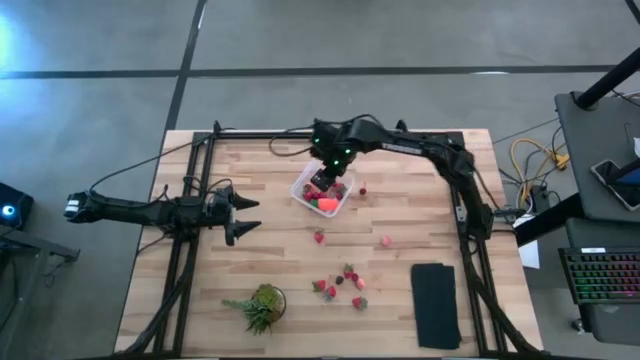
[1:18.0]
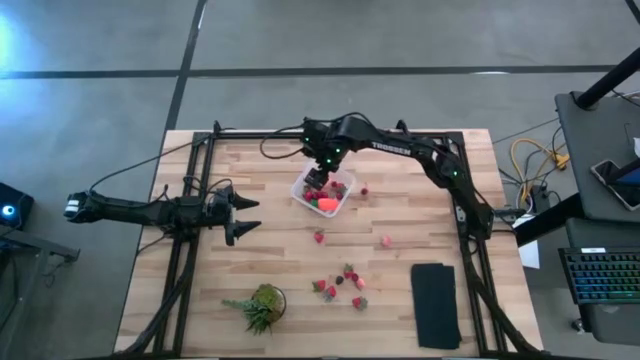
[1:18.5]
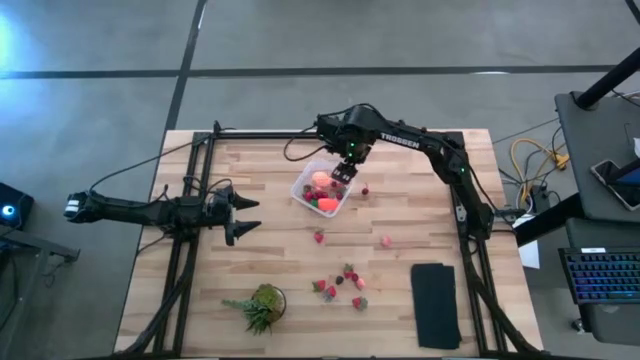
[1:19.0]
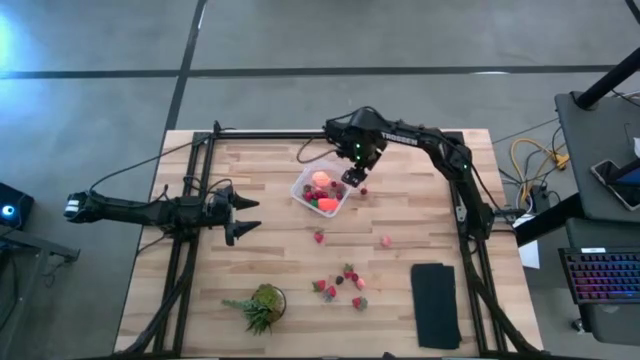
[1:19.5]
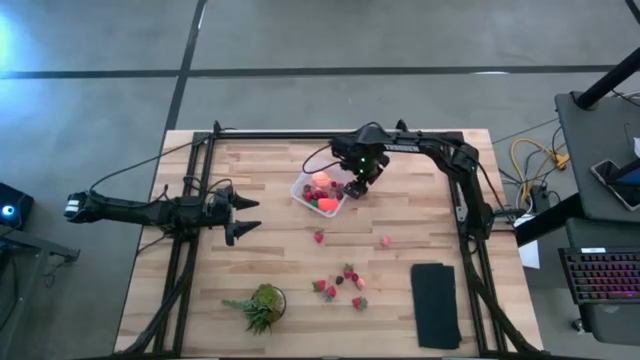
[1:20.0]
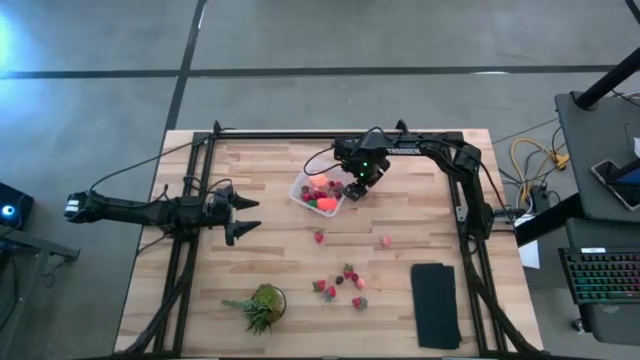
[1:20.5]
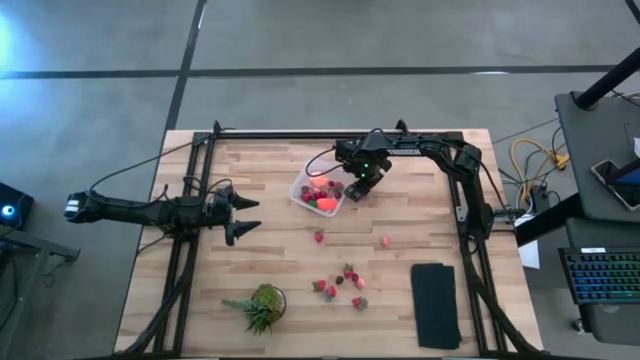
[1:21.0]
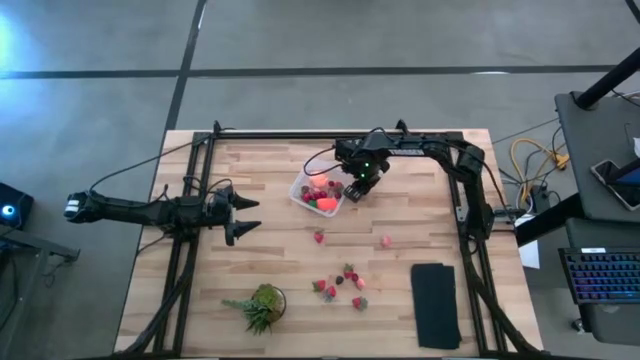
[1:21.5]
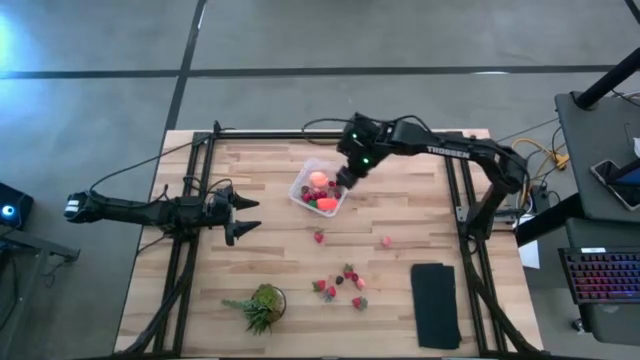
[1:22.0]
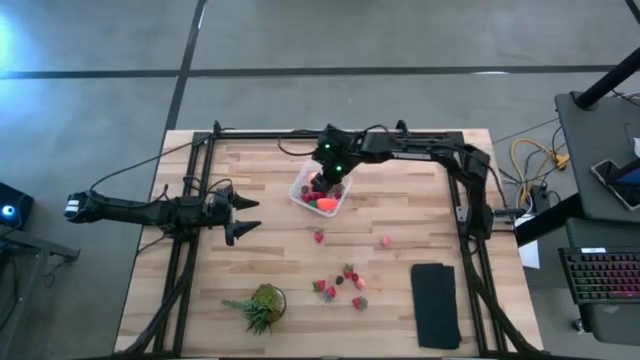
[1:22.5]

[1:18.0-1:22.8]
Task: Pick and placing Produce into tupperware
Put the red cherry into the transparent bin

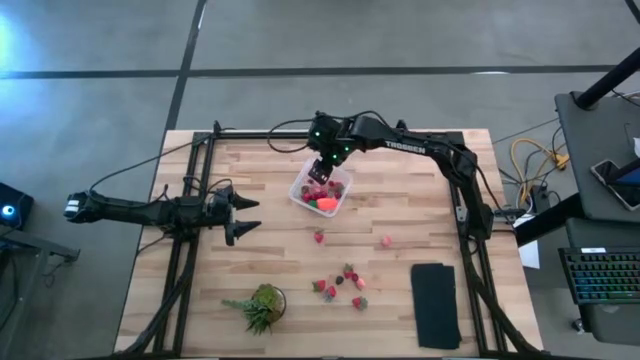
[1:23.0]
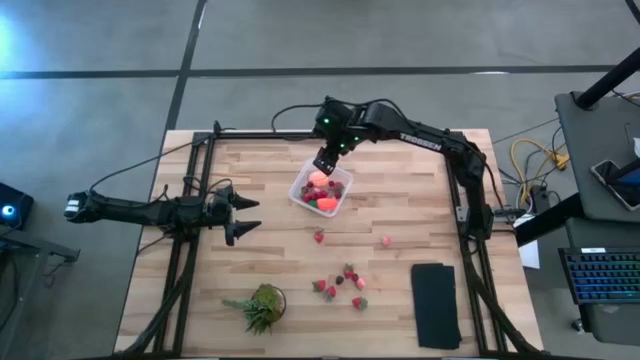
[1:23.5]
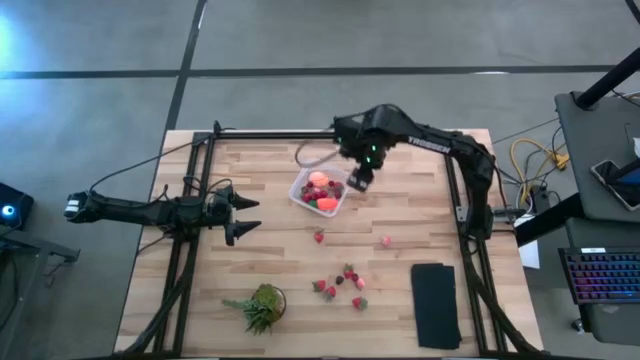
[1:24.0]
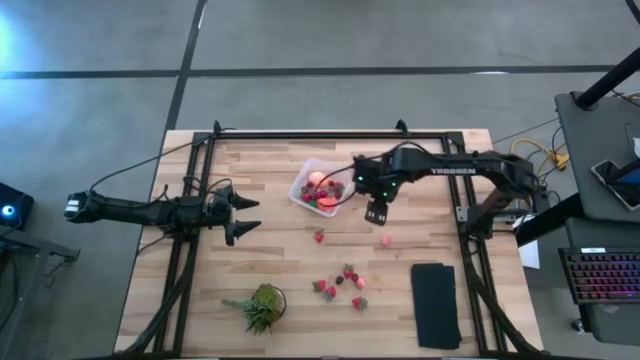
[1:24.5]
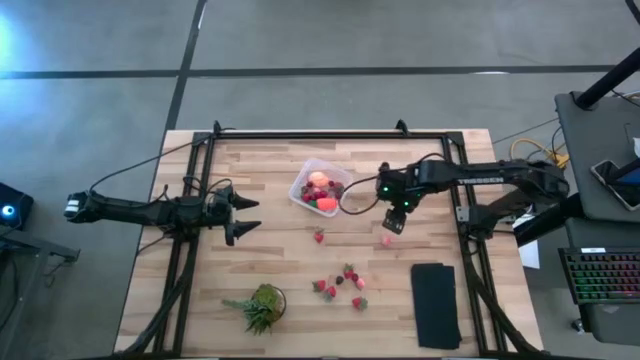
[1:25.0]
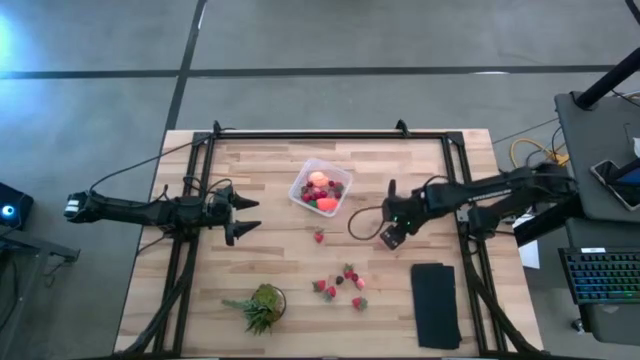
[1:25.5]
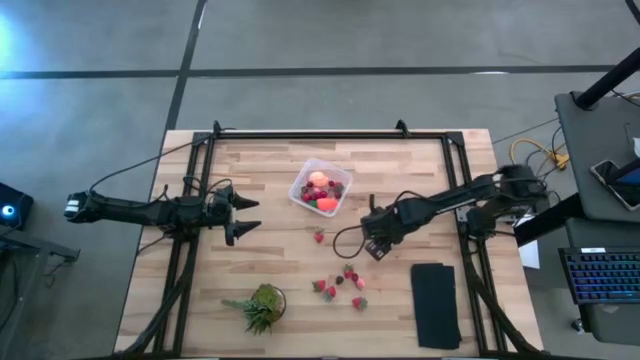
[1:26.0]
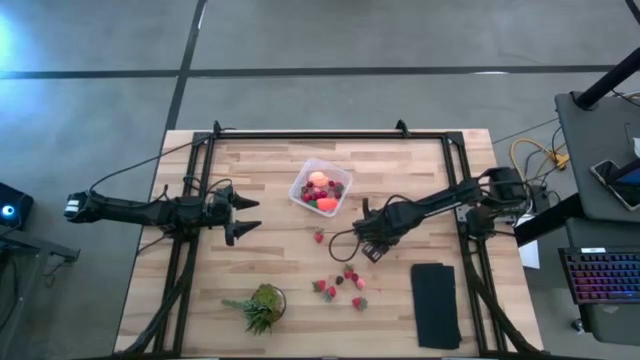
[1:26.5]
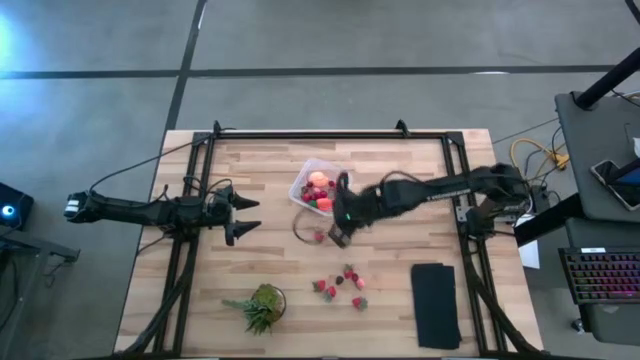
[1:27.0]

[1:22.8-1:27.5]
Put the pink peach into the transparent bin

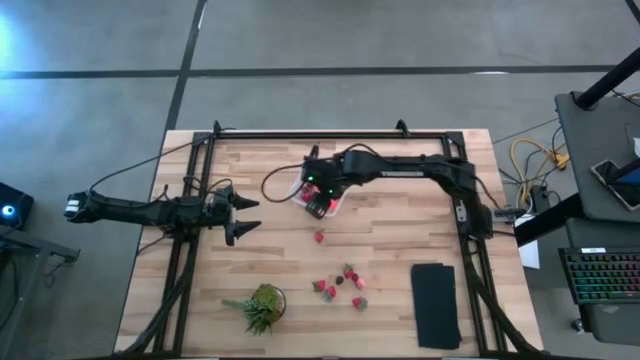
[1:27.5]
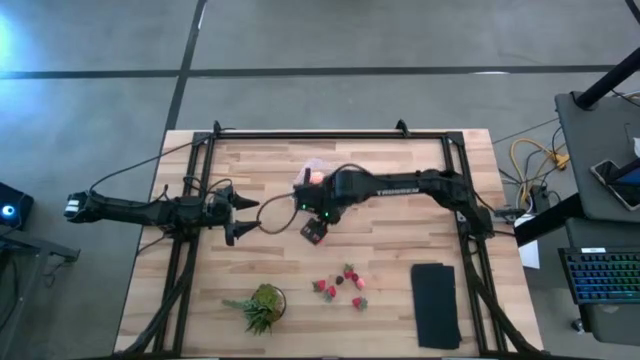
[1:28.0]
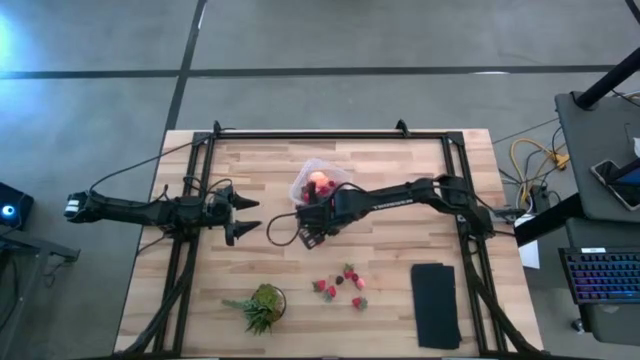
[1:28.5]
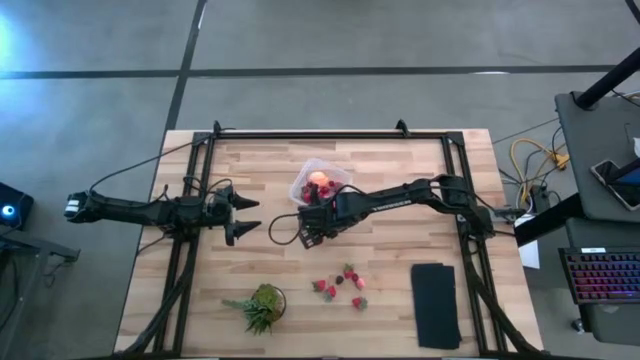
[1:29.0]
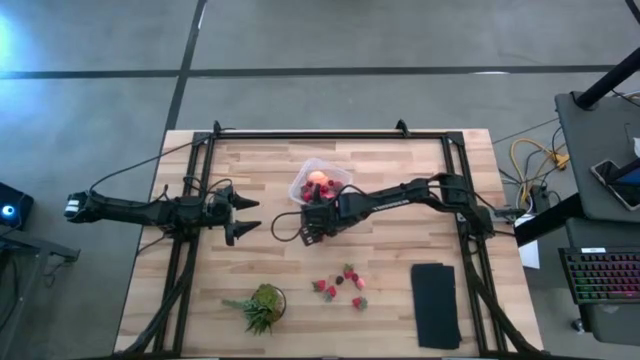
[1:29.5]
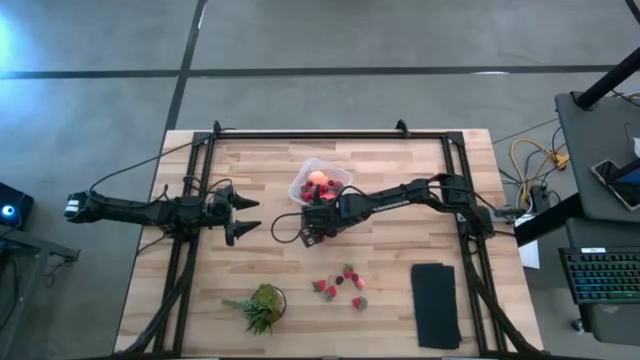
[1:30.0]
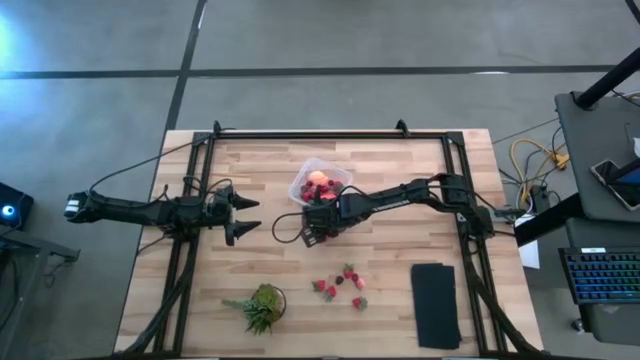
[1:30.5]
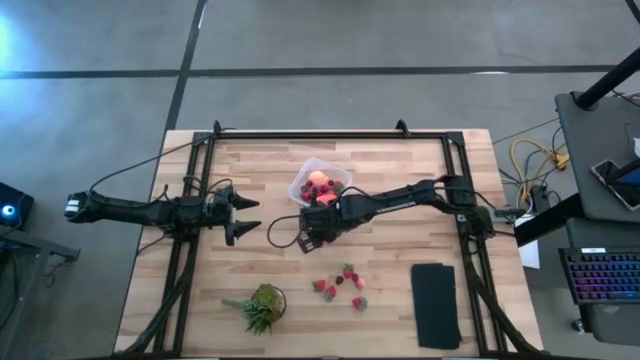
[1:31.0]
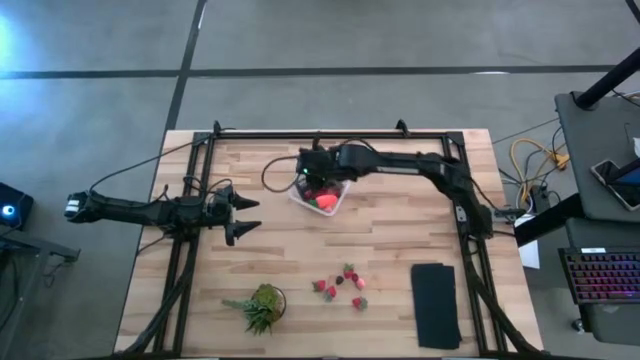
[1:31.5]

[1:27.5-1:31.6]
Put the red strawberry into the transparent bin

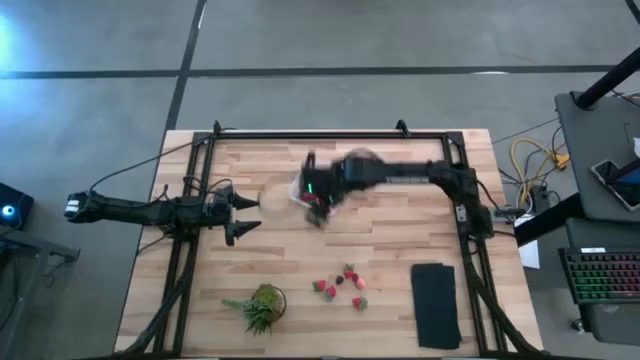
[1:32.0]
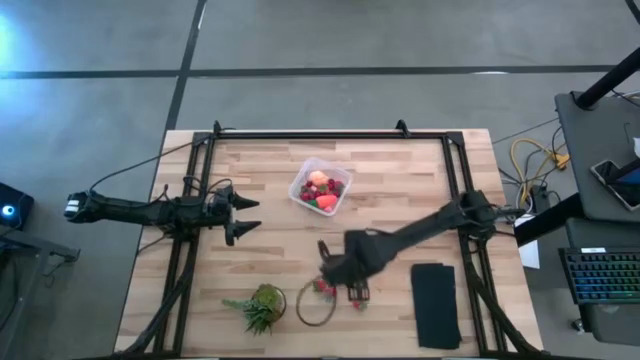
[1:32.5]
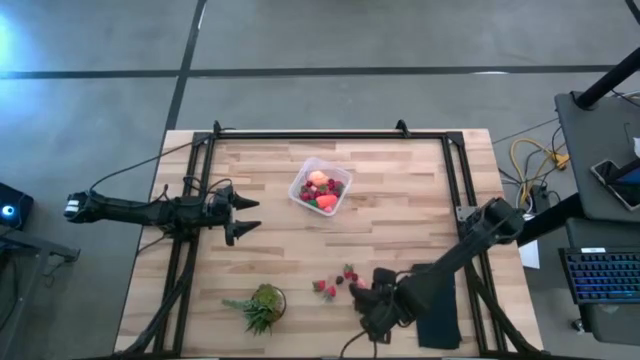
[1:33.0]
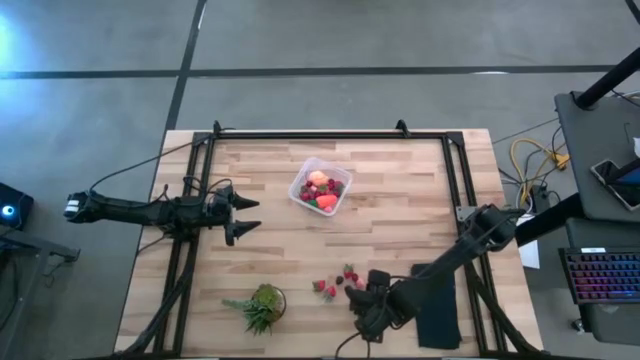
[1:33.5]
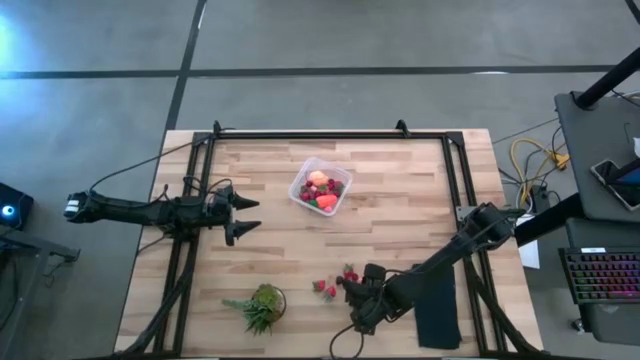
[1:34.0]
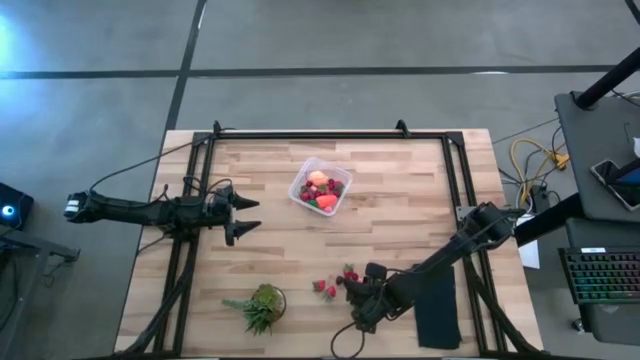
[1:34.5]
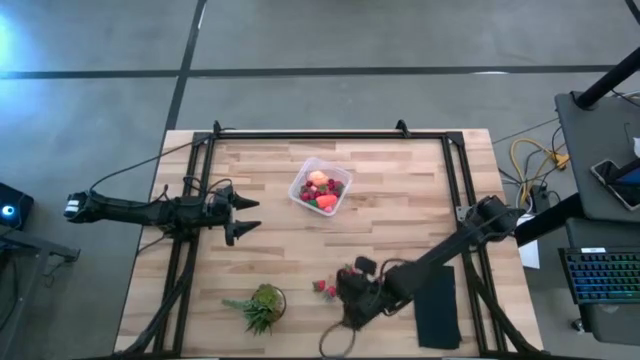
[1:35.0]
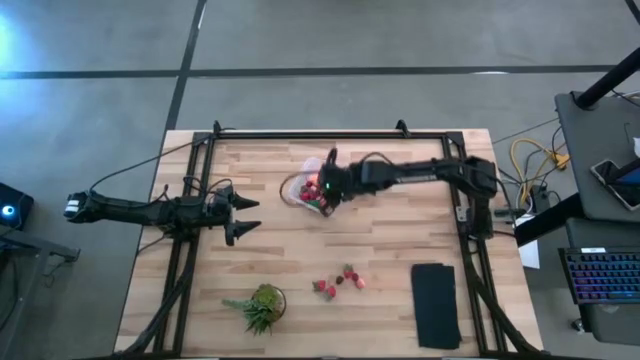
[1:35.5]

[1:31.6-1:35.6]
Put the red strawberry into the transparent bin

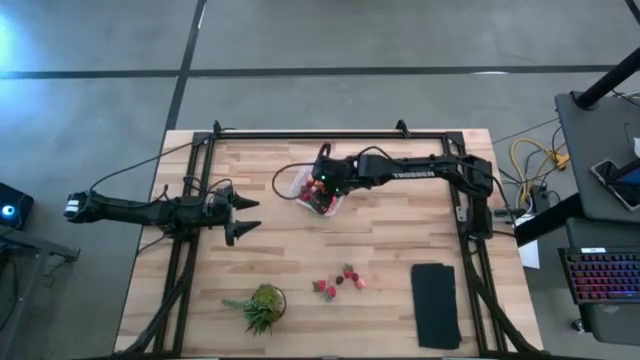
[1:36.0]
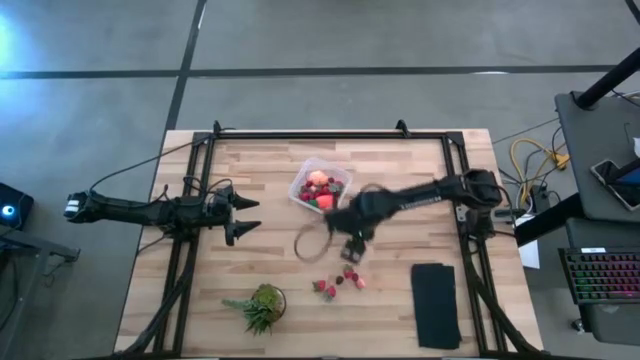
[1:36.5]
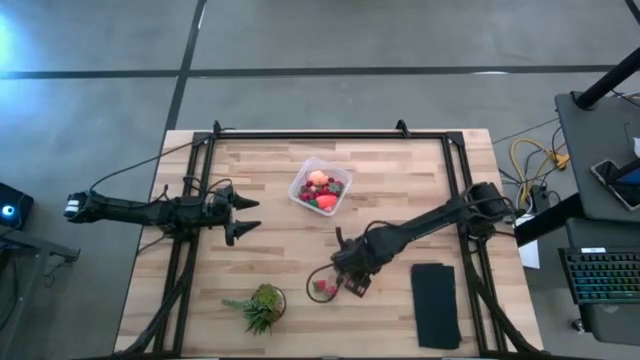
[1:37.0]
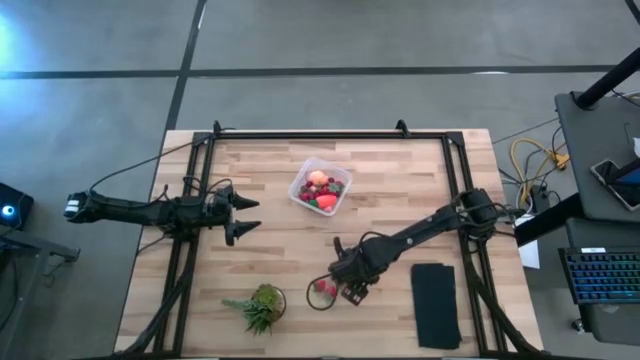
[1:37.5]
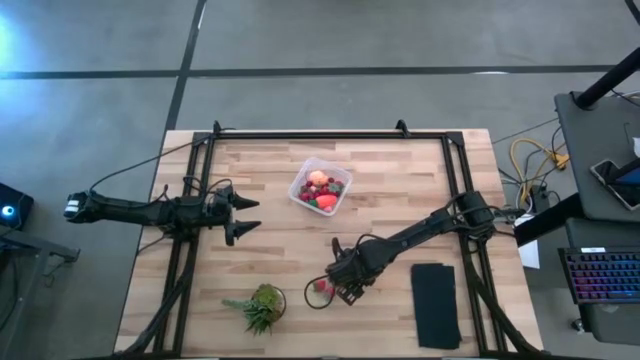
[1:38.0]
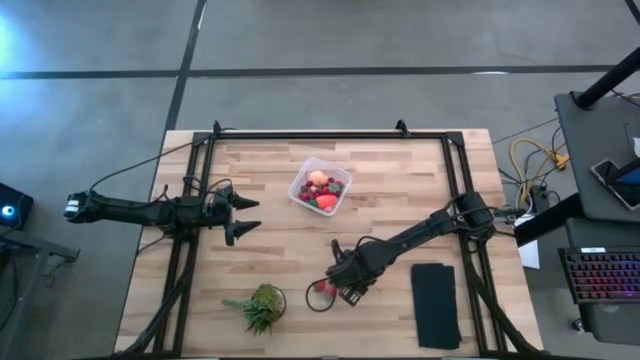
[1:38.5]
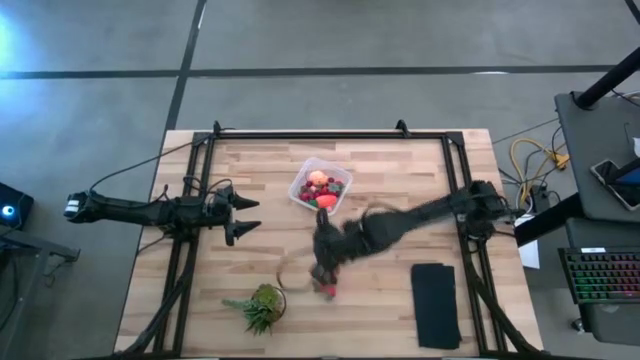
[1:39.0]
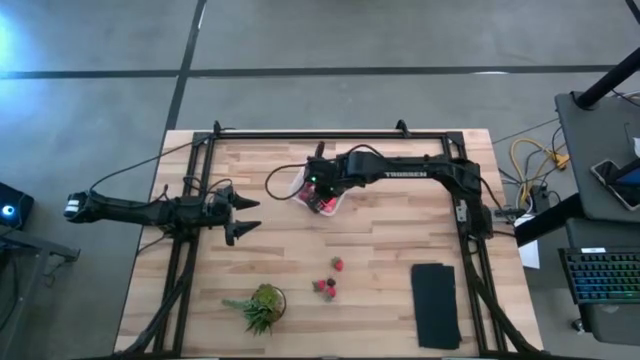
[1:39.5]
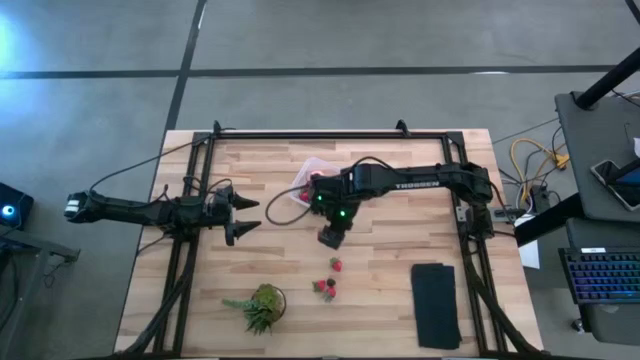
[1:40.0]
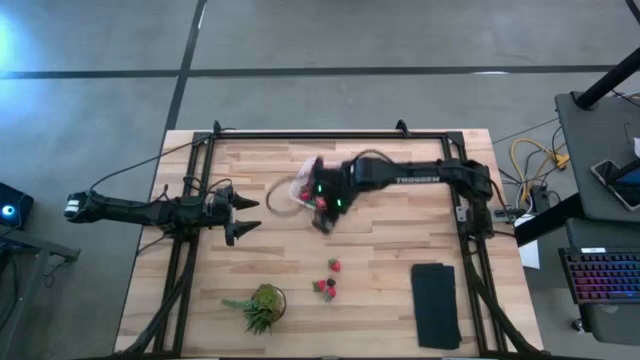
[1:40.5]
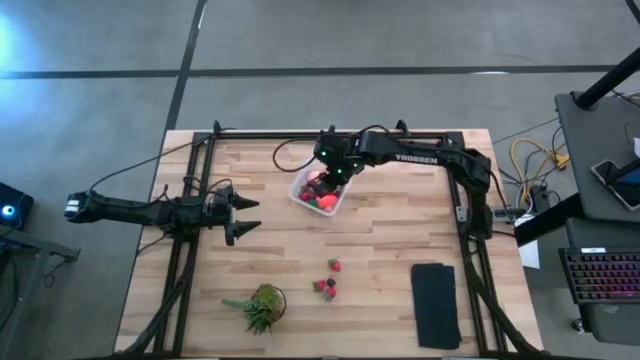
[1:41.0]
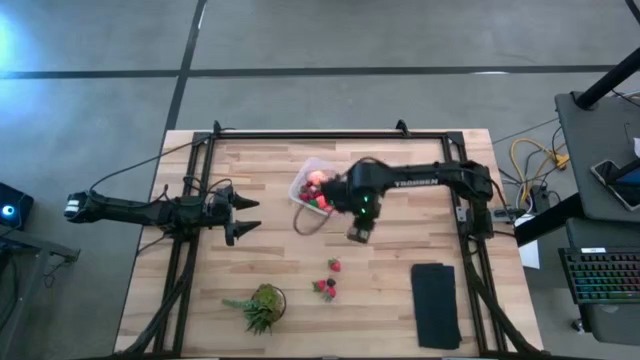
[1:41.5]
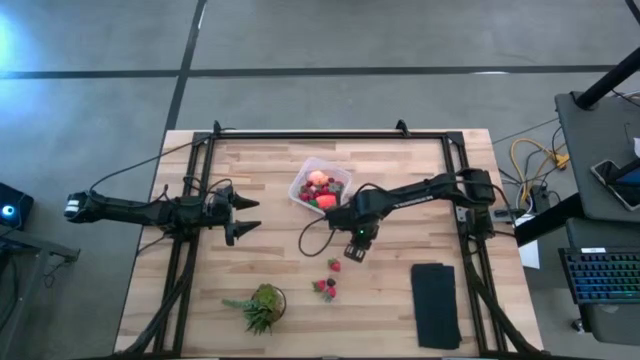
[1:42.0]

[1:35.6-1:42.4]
Put the pink peach into the transparent bin
